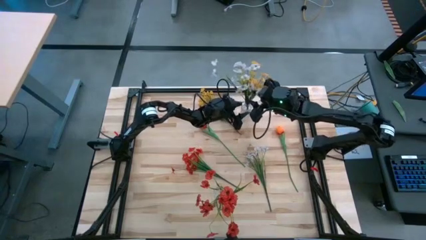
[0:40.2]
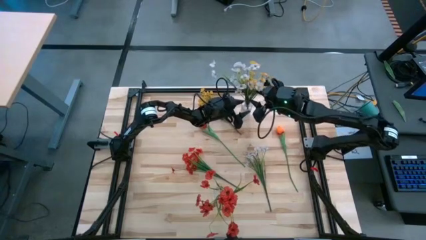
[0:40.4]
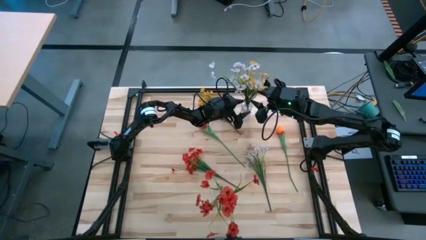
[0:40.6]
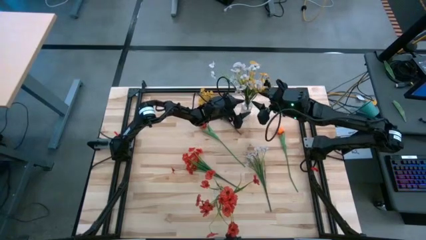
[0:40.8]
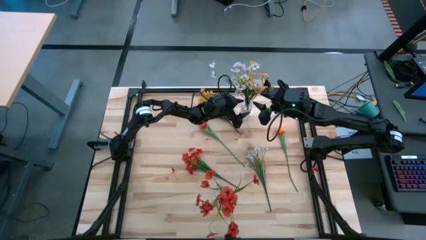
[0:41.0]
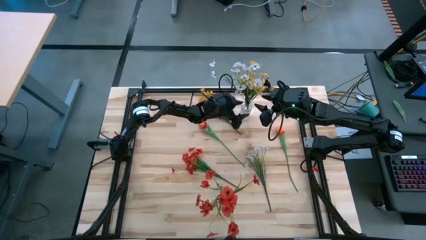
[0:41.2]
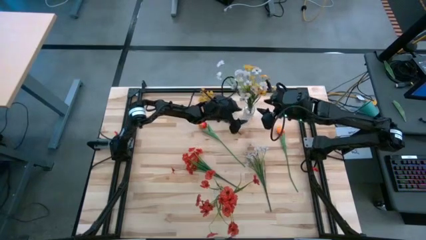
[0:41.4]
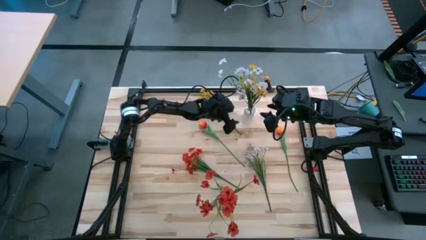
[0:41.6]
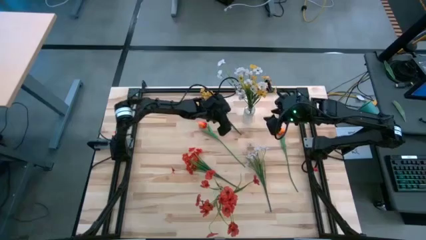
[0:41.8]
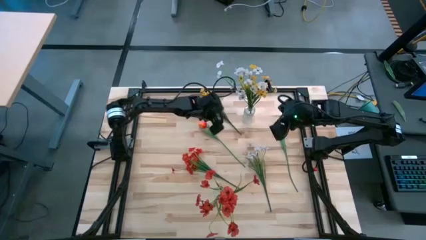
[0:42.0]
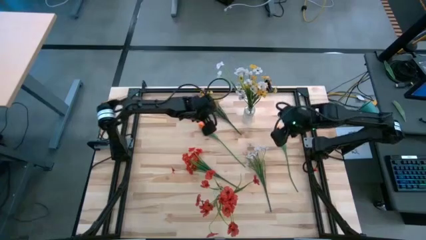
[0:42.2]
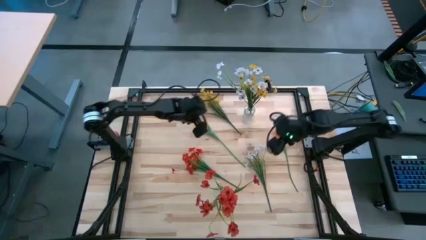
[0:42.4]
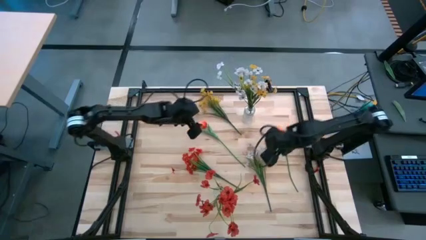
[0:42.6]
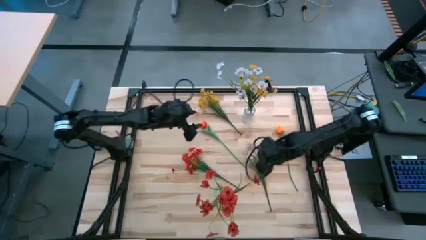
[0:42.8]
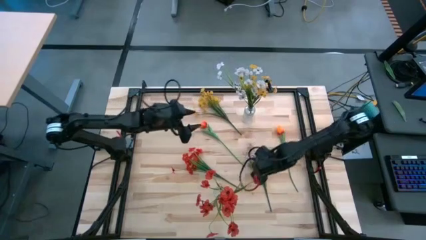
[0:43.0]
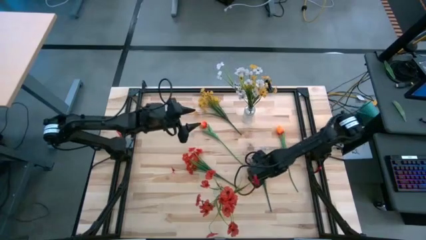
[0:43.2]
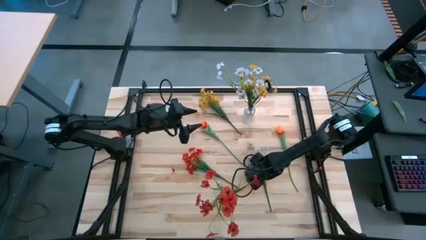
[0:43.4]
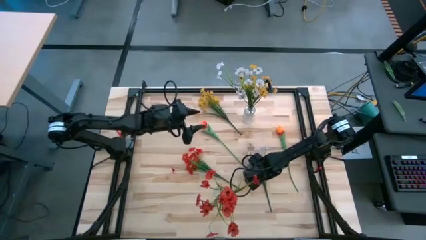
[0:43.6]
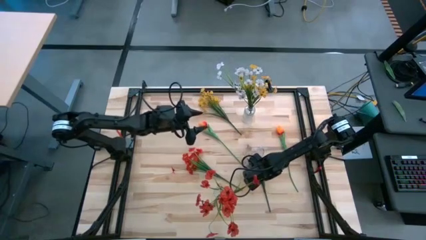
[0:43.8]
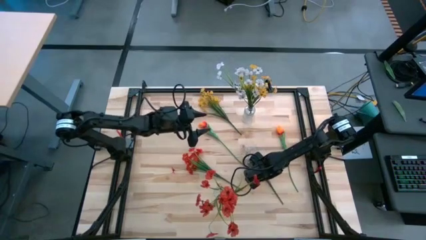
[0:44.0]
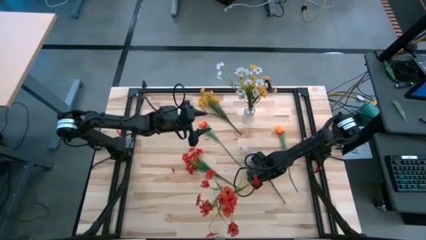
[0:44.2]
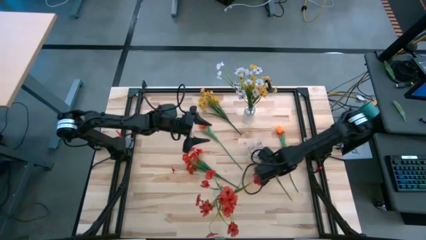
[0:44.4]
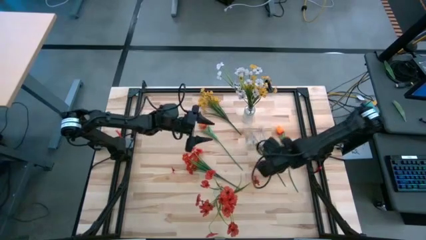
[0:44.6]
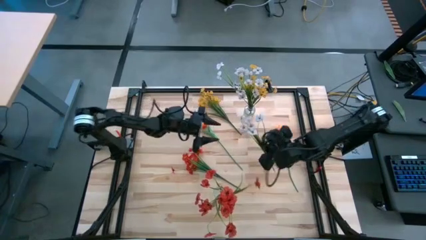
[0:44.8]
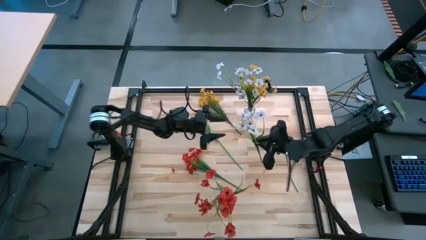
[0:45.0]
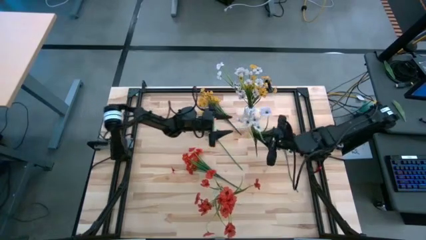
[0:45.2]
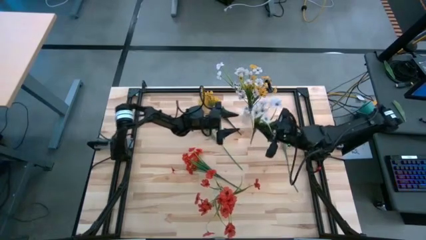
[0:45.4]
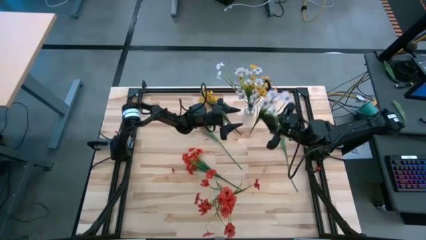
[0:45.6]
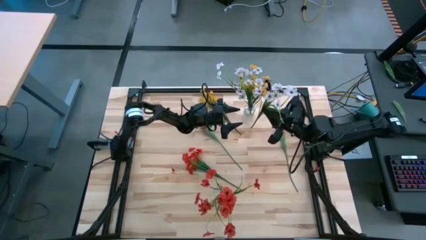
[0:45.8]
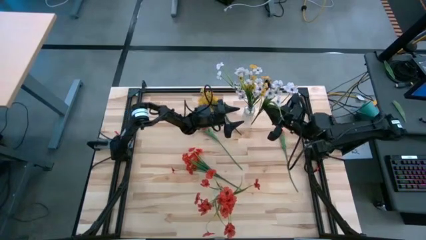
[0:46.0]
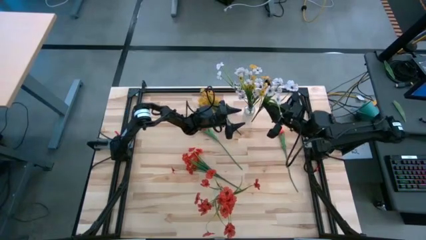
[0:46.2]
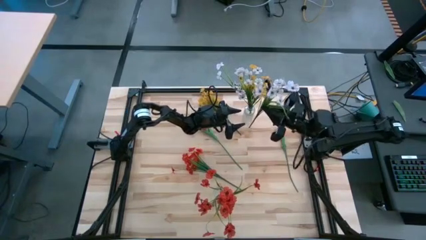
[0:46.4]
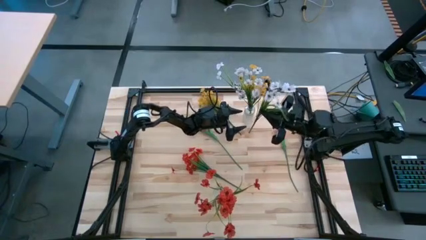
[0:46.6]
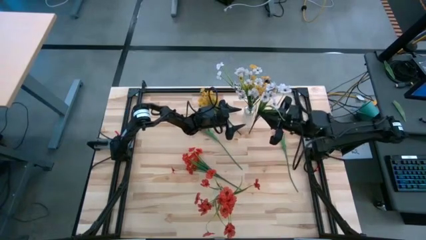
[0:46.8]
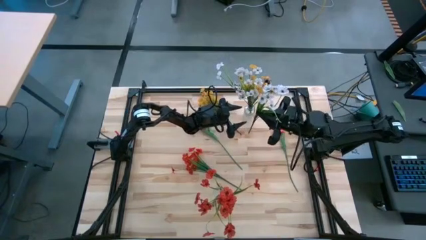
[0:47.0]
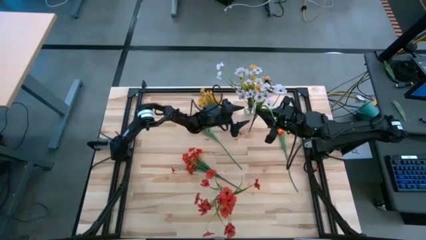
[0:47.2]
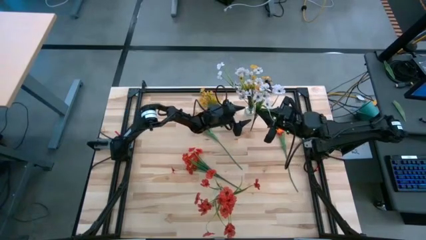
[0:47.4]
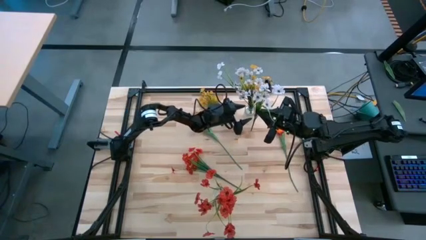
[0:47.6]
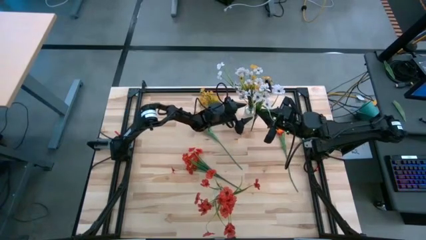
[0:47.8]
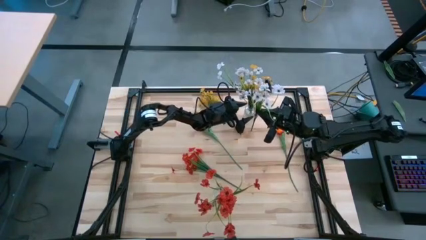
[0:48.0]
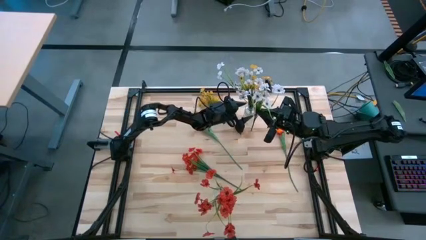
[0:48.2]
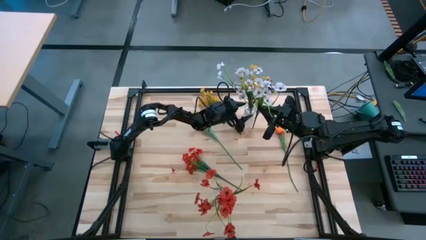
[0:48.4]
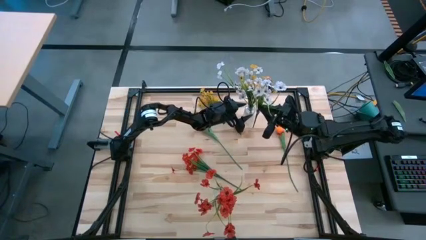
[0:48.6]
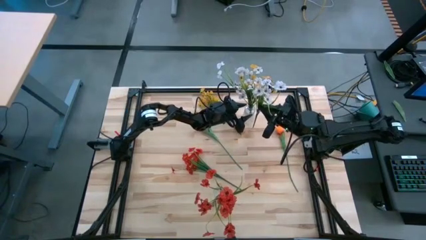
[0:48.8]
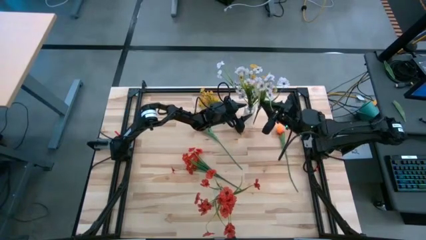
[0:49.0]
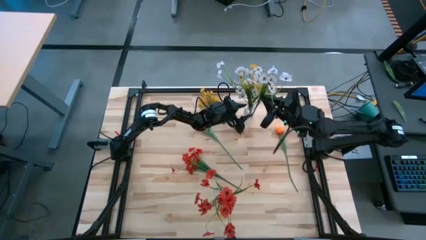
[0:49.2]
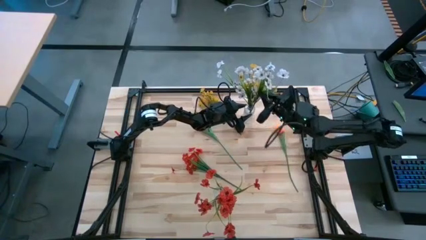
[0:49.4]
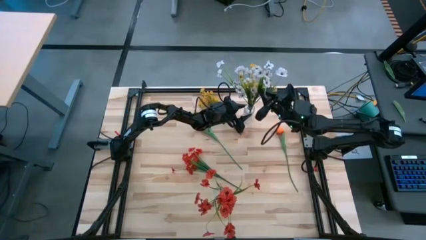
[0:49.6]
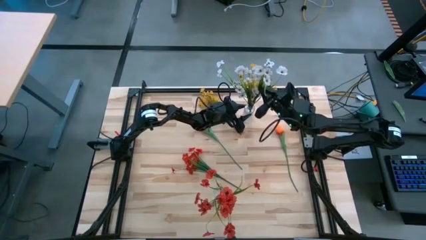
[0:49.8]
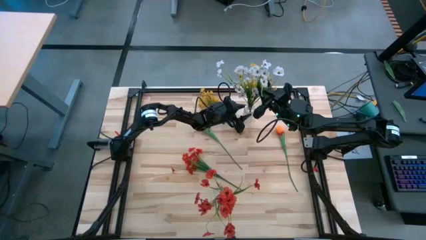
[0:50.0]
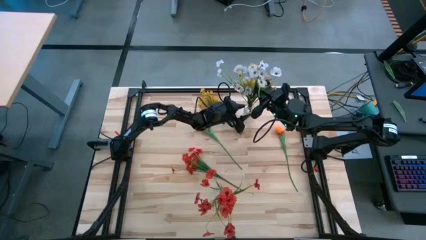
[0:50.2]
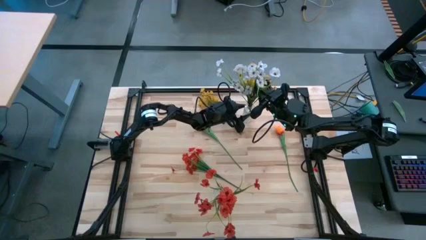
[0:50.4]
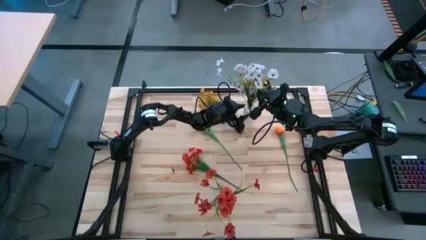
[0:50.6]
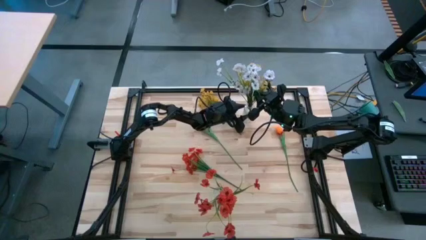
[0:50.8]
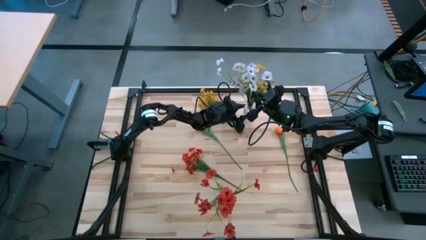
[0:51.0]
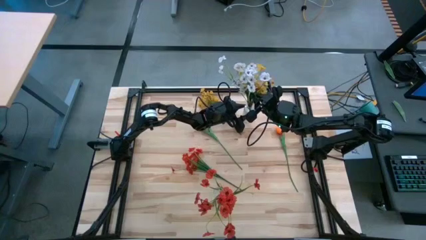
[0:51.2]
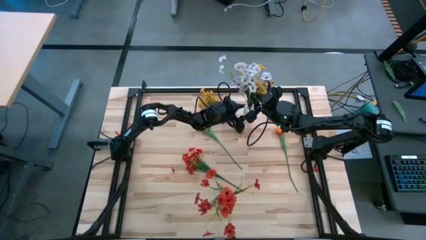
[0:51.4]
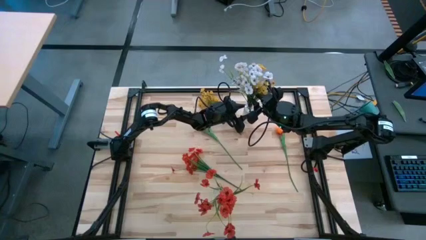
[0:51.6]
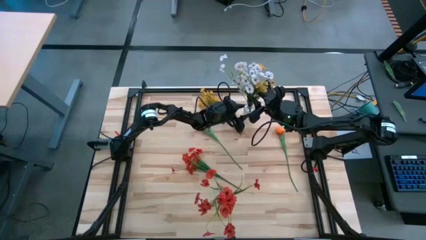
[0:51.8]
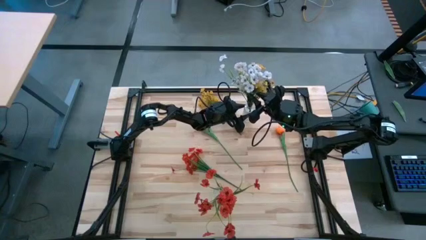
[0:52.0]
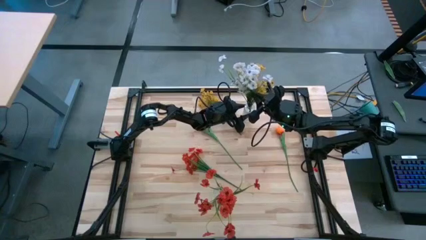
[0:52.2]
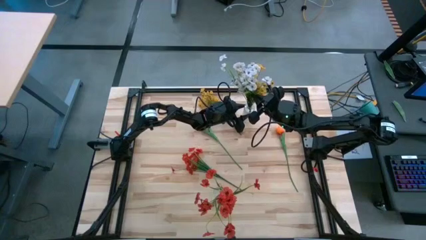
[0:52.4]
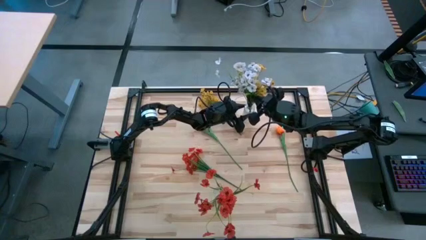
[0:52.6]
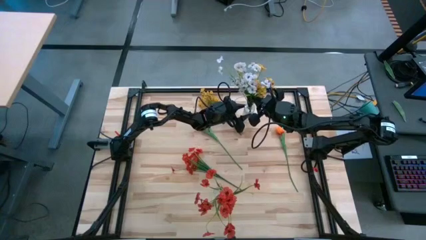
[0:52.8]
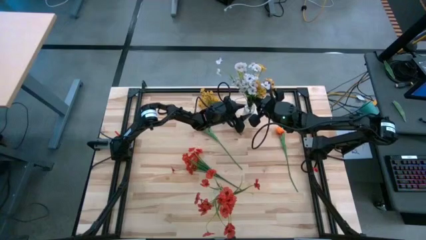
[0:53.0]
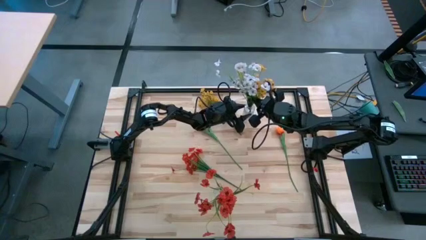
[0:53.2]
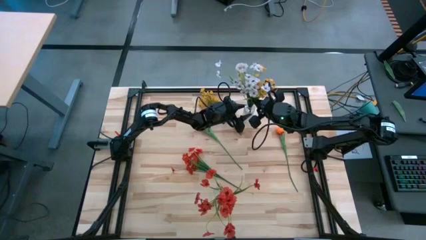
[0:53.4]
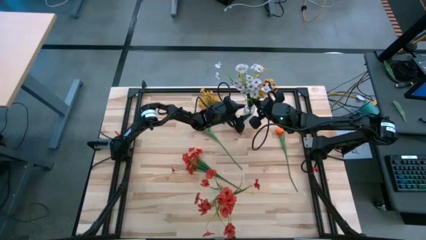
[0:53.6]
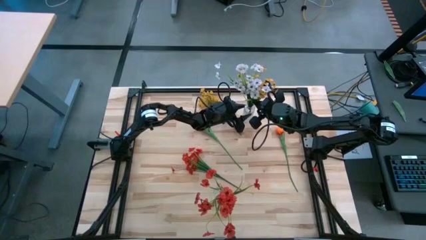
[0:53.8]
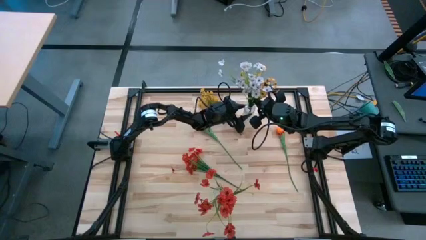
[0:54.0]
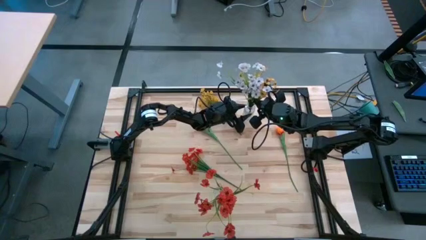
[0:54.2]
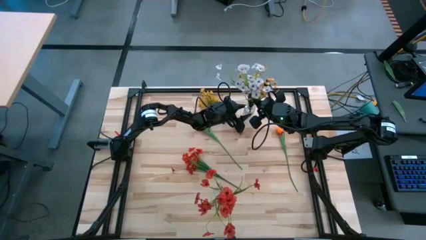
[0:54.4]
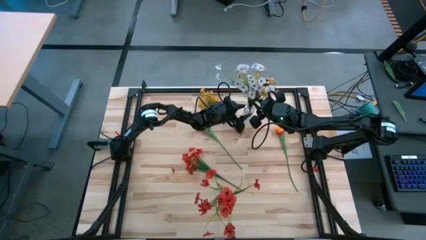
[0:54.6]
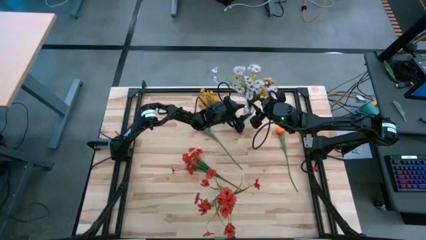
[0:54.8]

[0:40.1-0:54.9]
Task: Sort flowers into vase by color
Put the white flowers into the top transparent vase
